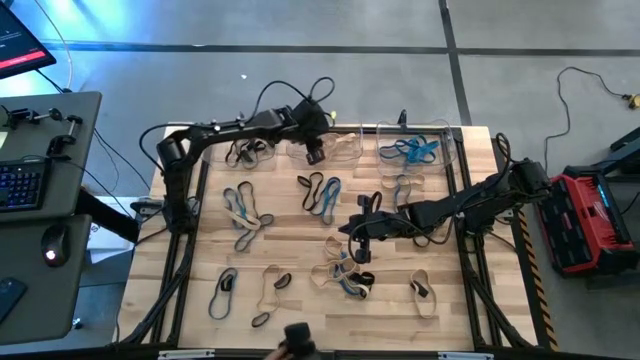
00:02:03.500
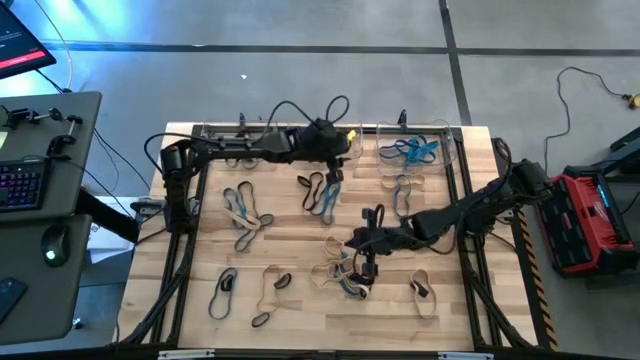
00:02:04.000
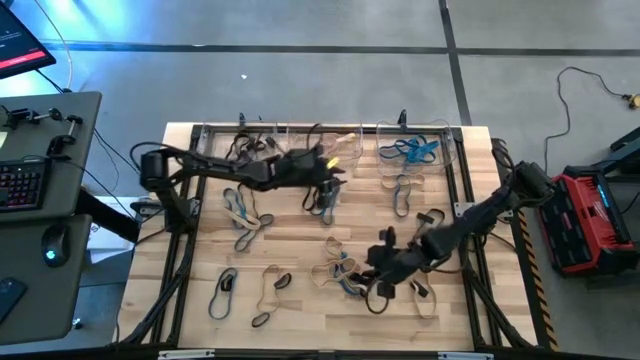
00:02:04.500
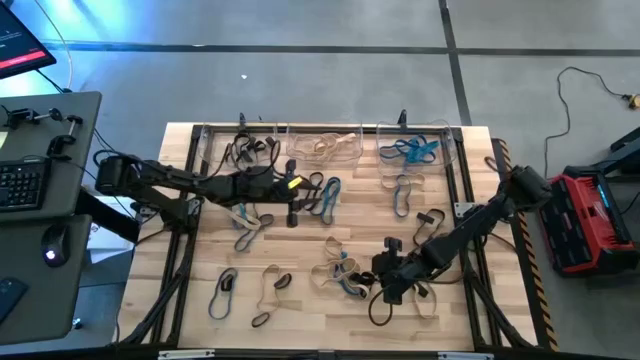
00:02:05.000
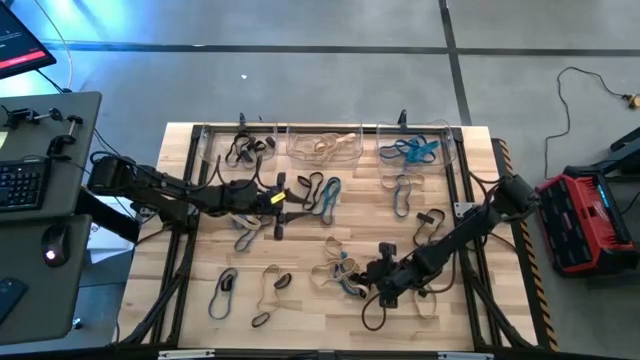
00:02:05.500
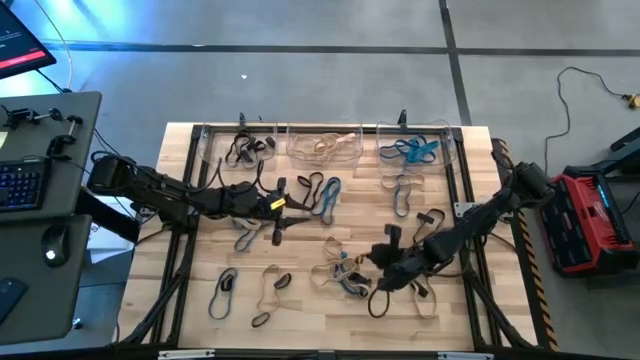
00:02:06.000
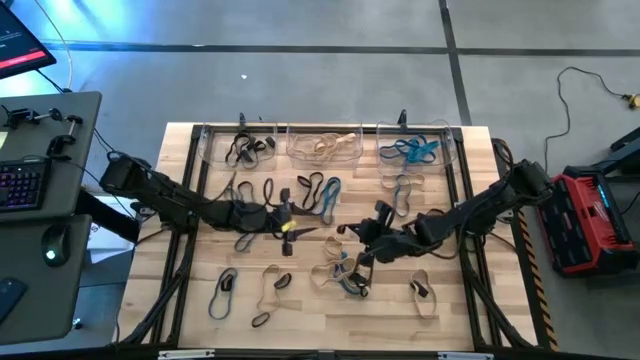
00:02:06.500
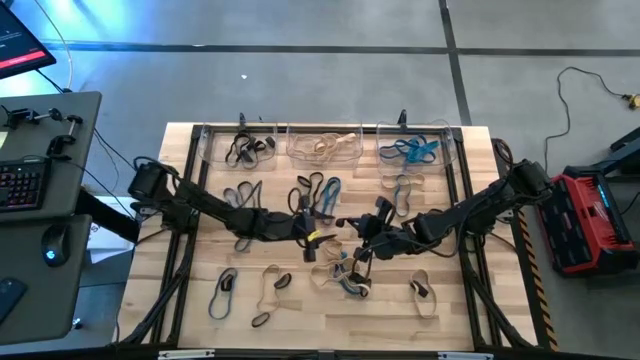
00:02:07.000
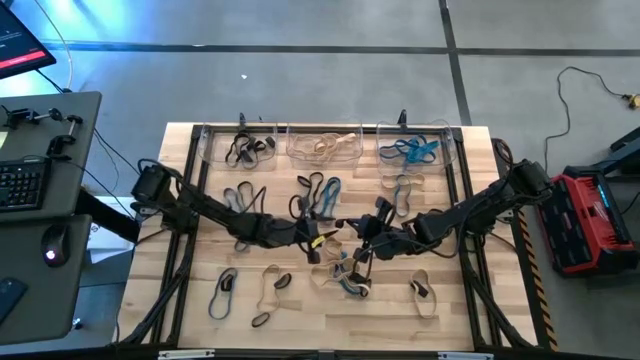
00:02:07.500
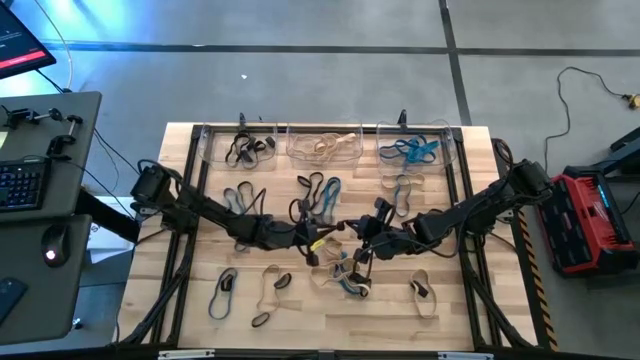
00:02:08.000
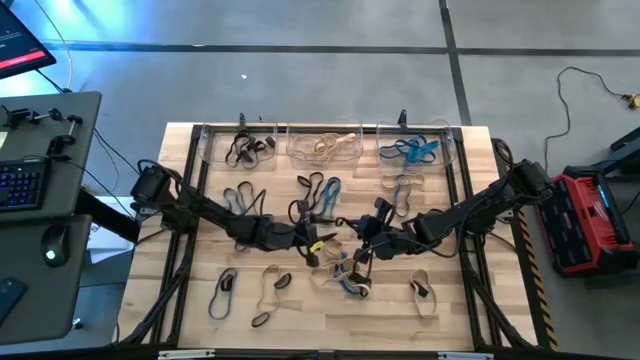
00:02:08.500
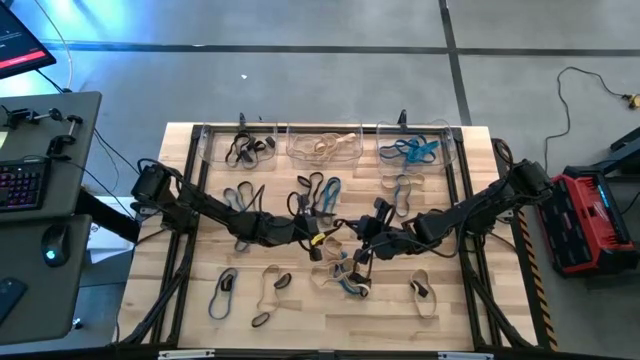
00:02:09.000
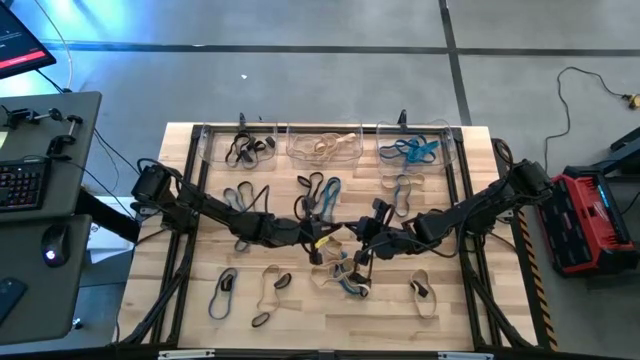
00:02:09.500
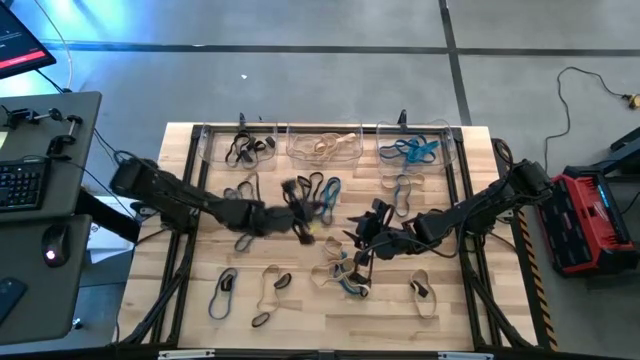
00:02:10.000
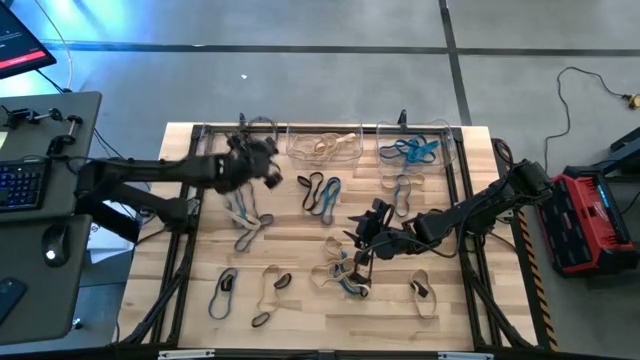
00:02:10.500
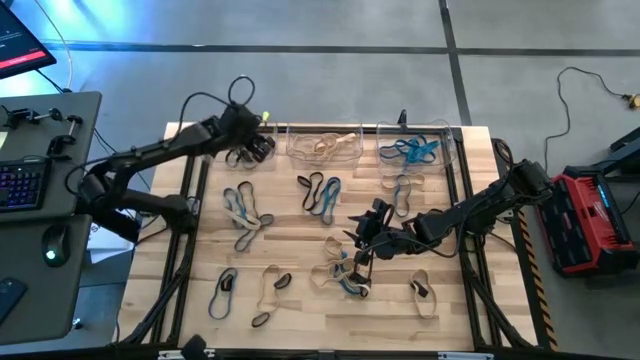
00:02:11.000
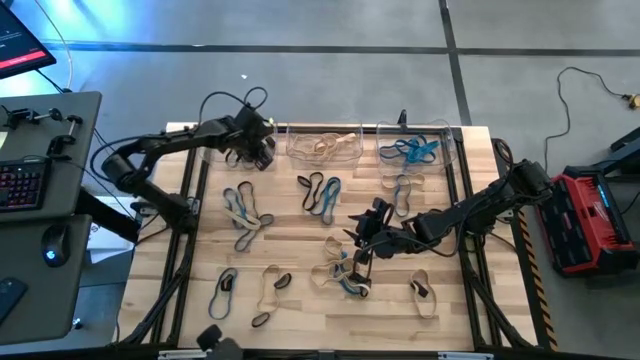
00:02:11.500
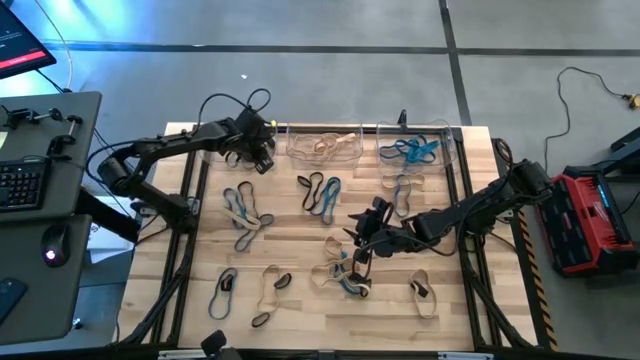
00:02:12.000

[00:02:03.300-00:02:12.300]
Task: Sort rubber bands into baskets
Put the black rubber band into the left transparent bin

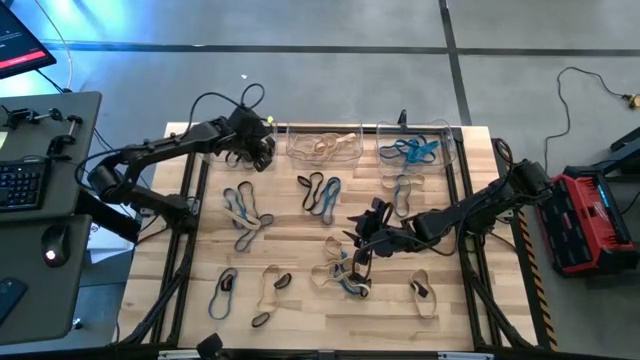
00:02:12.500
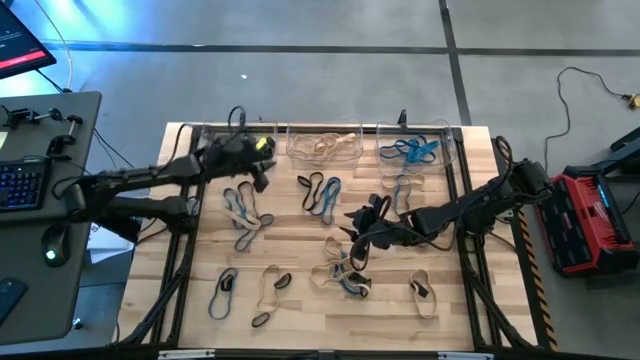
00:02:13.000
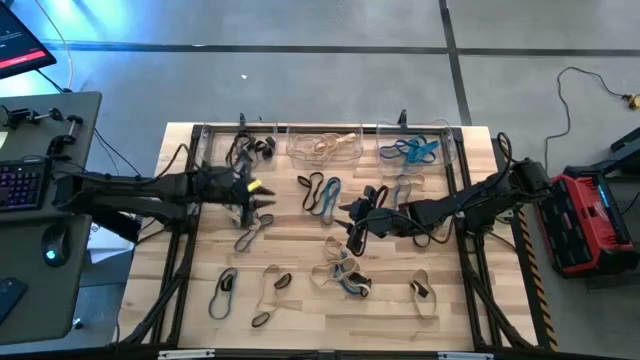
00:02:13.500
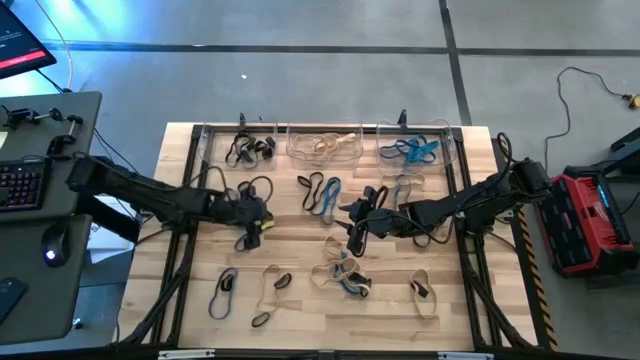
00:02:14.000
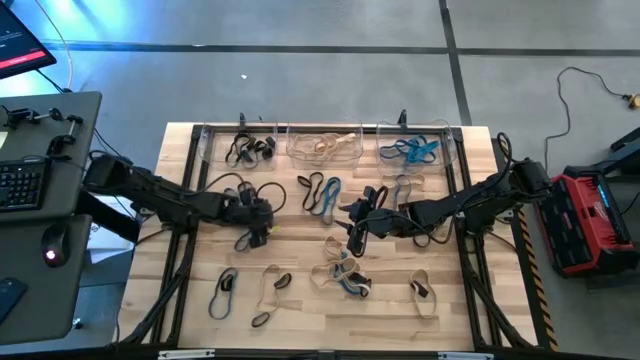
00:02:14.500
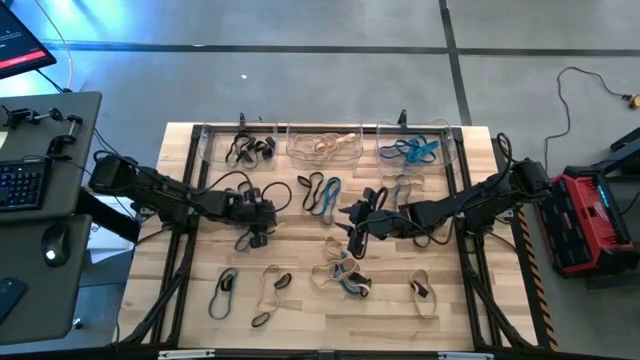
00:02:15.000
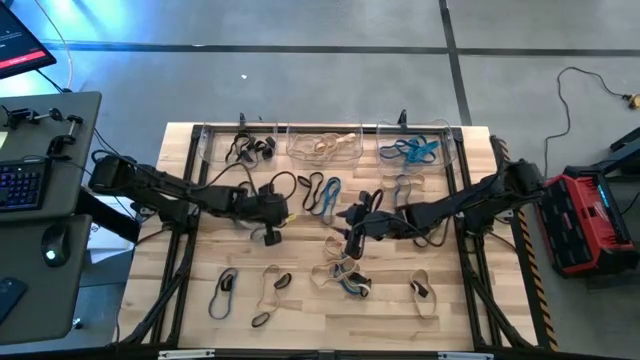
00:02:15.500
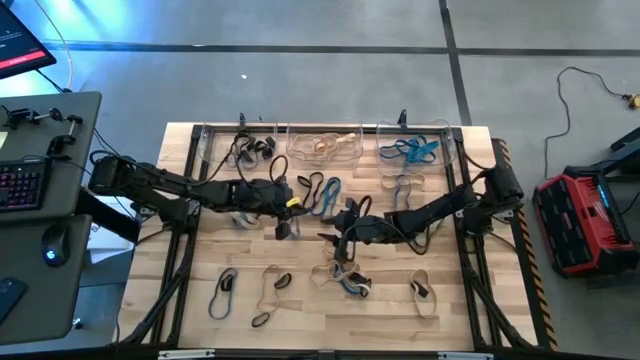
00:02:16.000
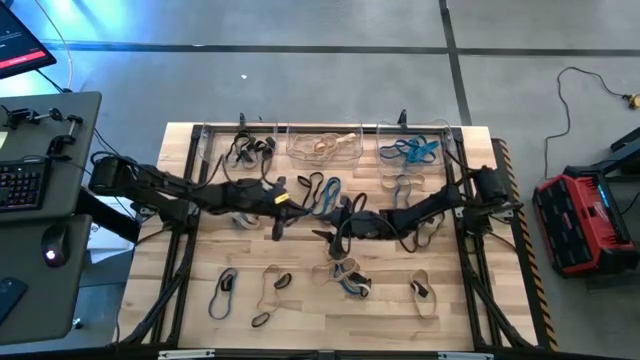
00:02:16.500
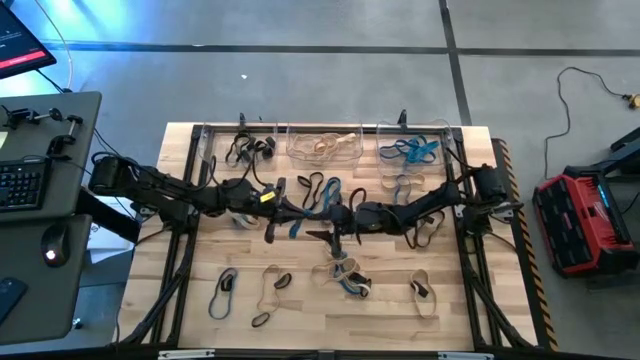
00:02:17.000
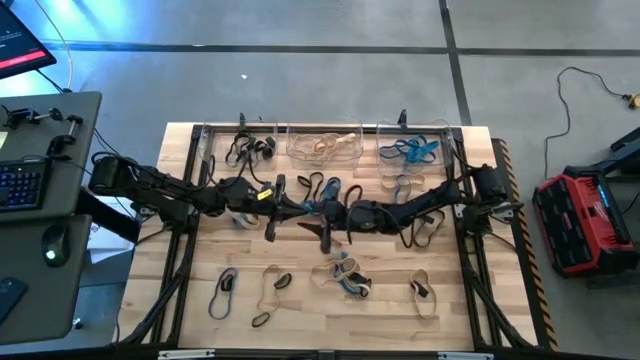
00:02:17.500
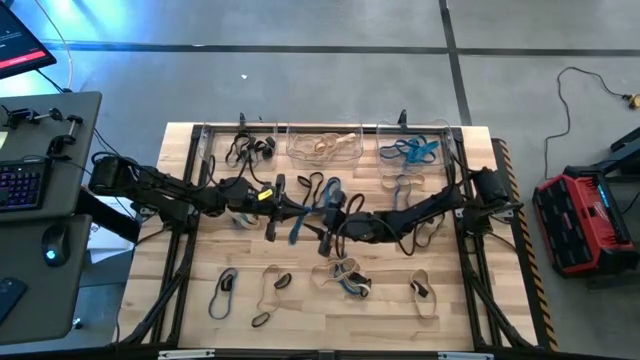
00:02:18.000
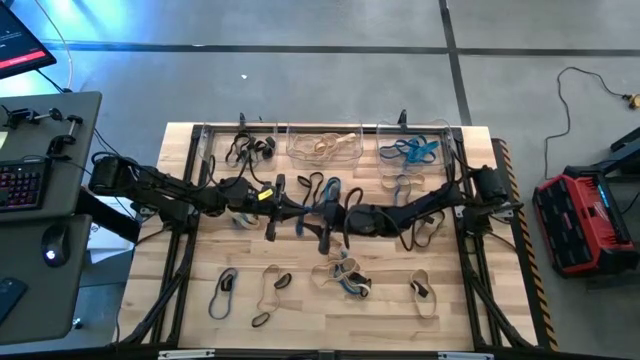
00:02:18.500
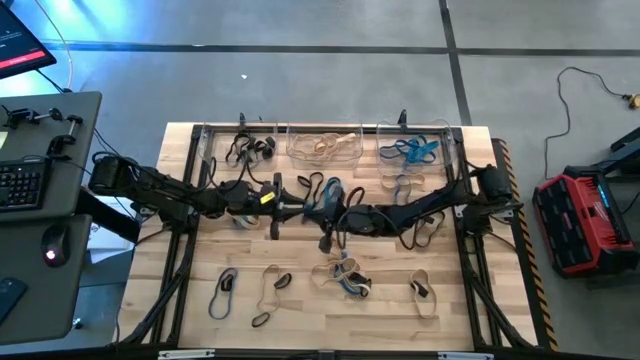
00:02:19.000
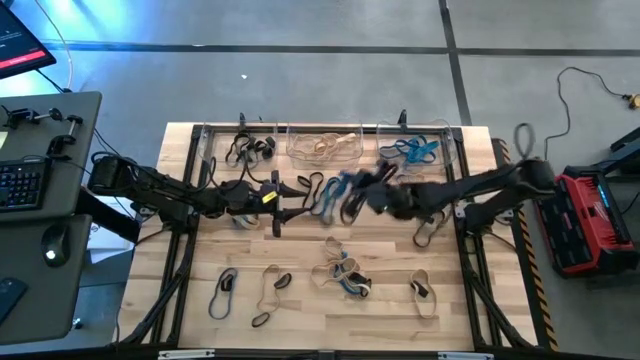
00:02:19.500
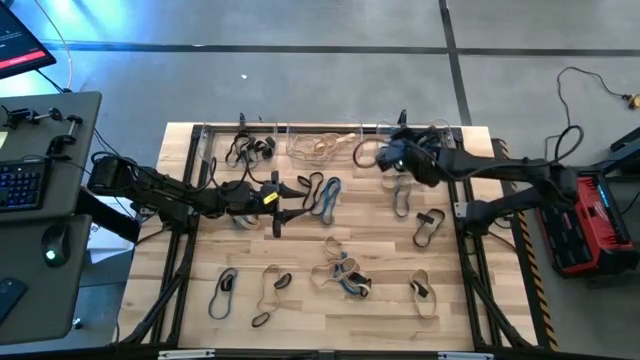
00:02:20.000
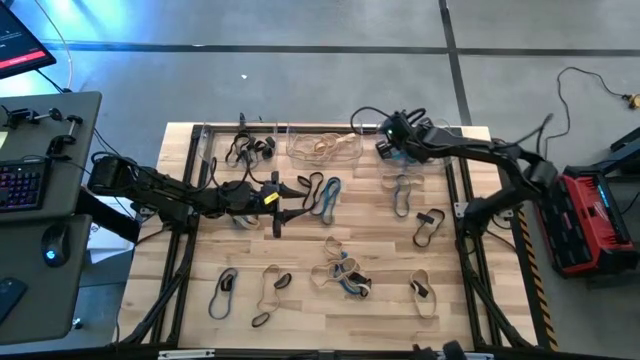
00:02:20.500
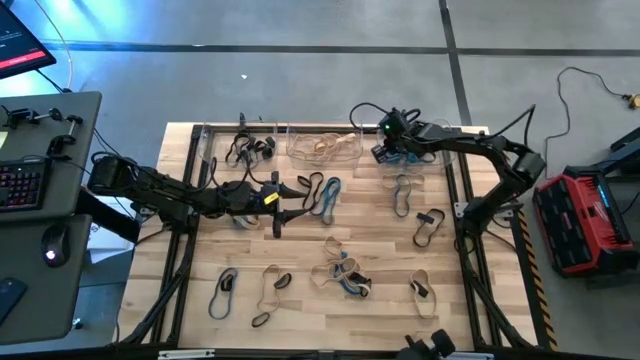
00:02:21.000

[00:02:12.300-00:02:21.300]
Put the blue rubber band into the right transparent bin

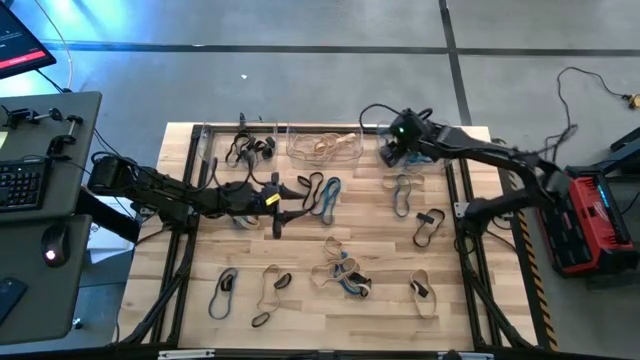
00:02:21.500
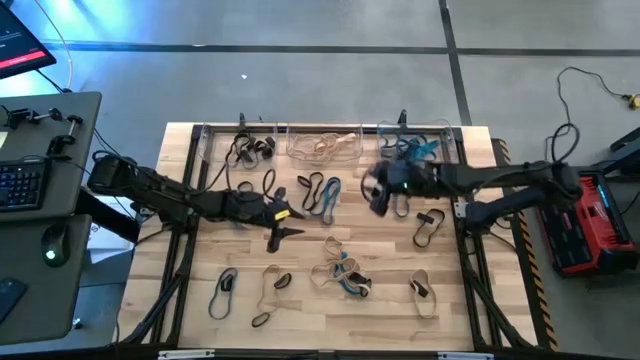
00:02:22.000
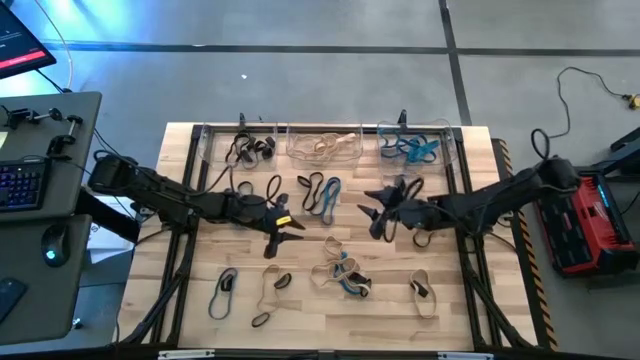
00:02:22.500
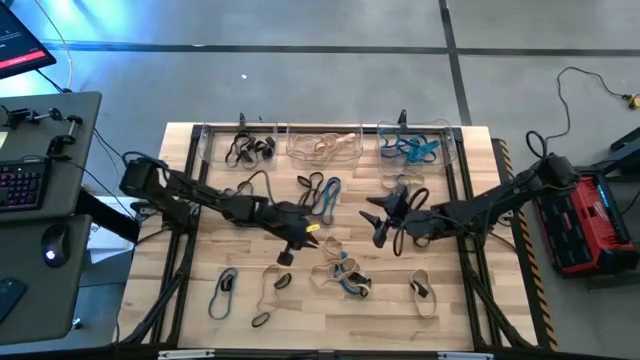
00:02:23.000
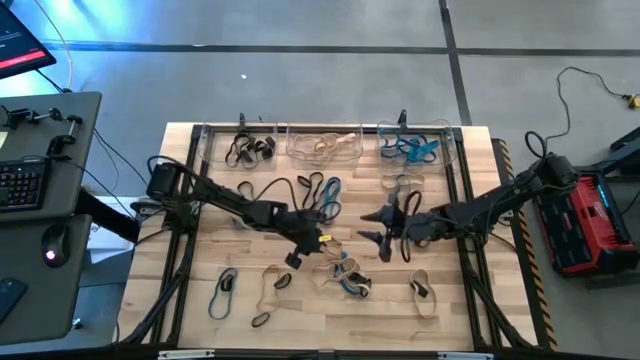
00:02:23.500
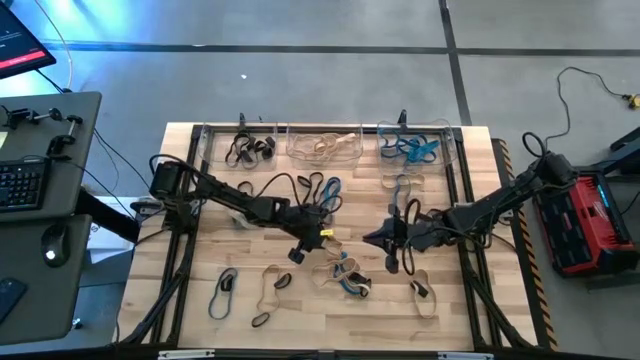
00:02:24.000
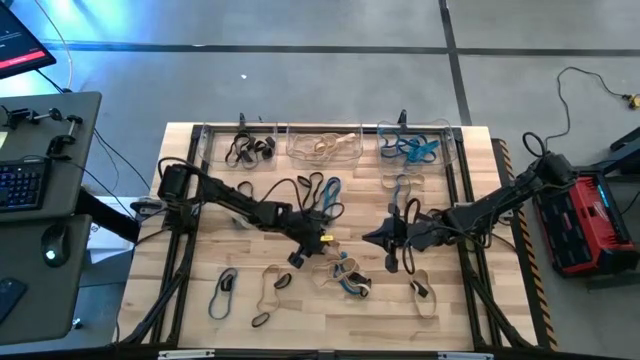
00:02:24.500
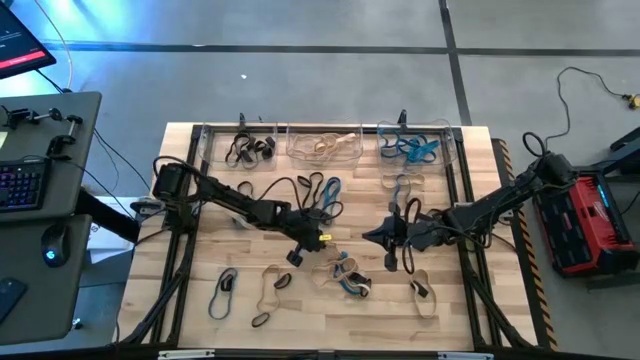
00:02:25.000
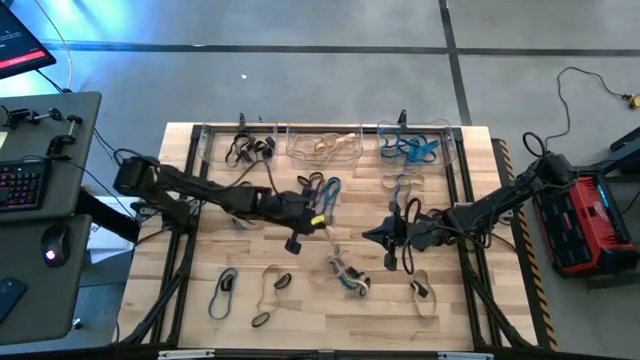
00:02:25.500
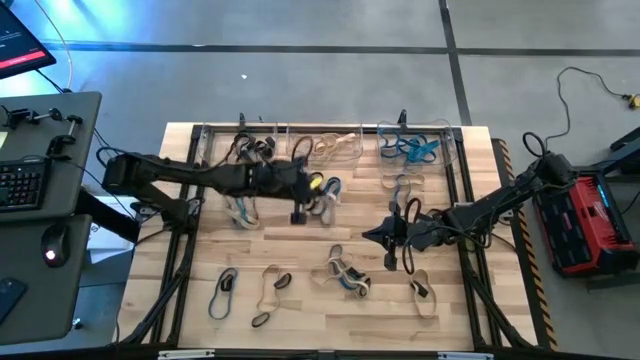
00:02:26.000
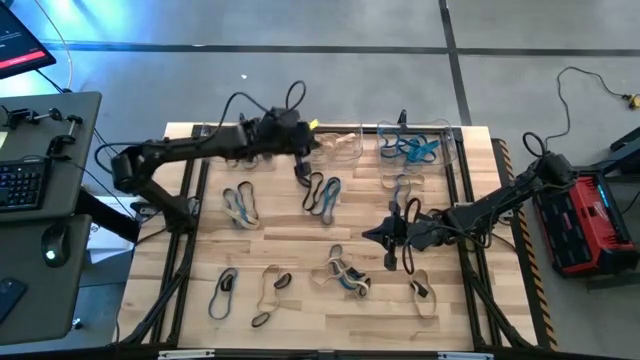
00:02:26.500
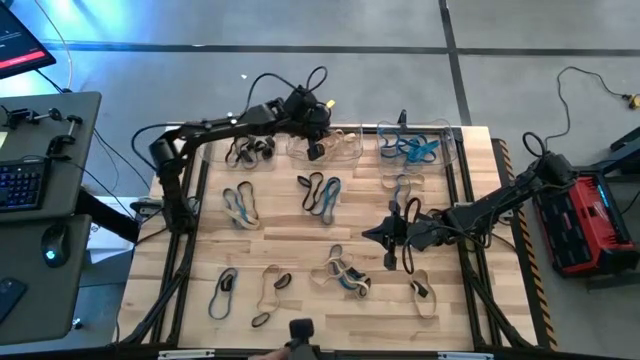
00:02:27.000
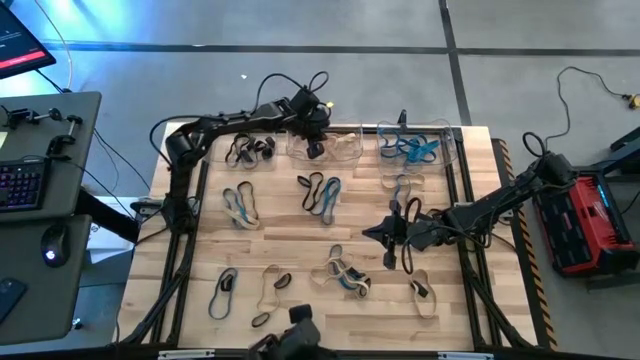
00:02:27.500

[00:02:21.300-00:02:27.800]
Put the brown rubber band into the middle transparent bin
